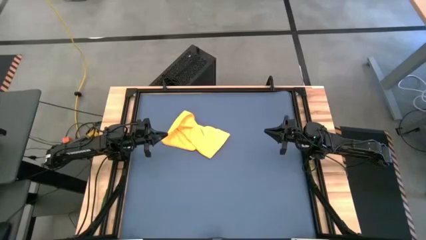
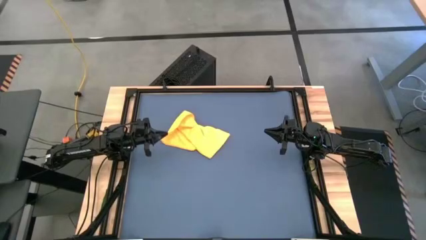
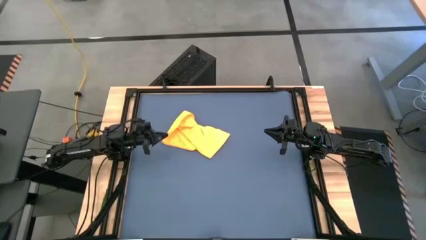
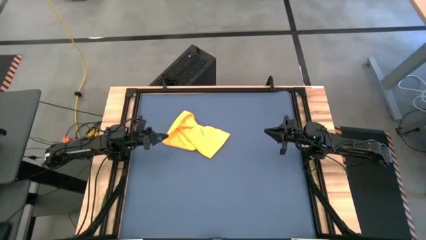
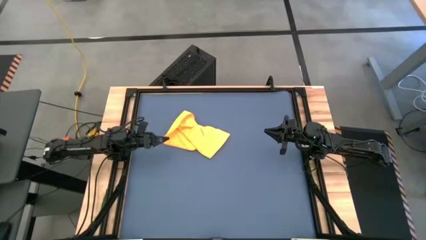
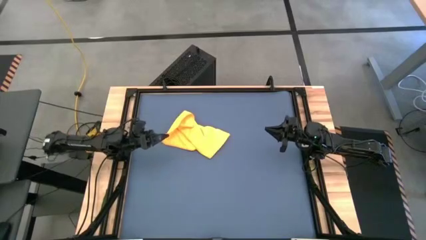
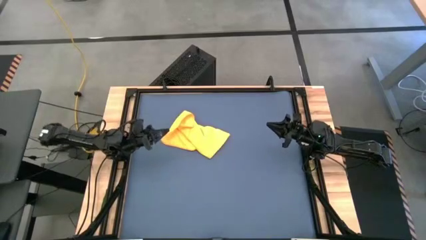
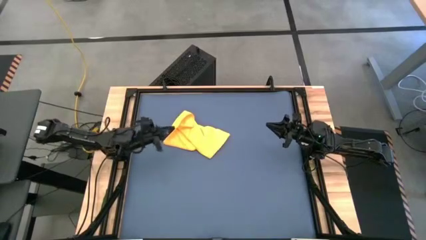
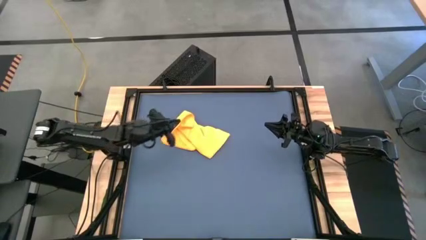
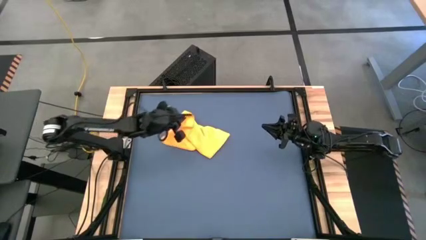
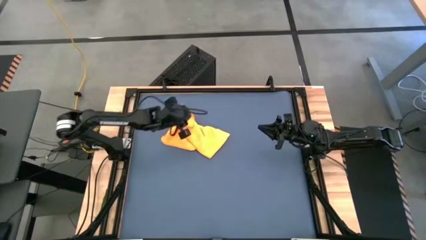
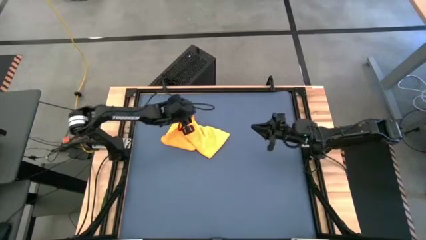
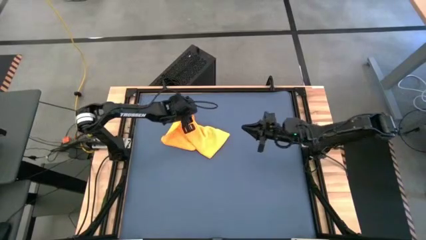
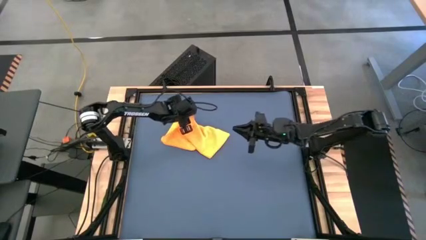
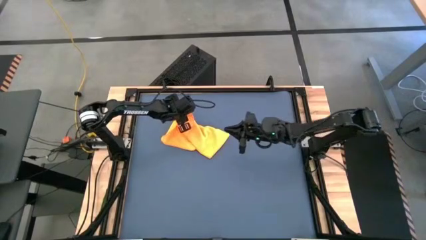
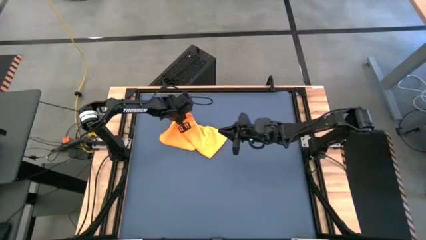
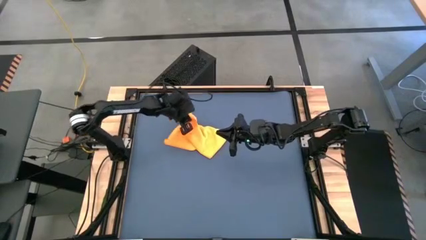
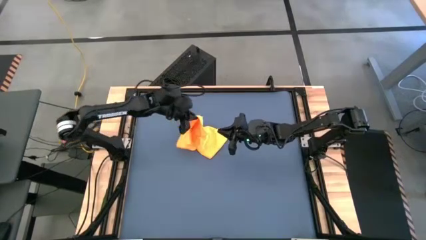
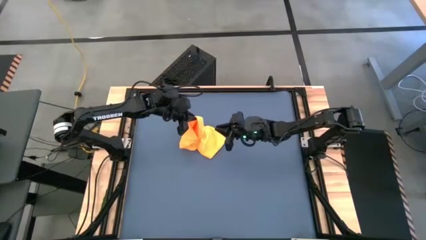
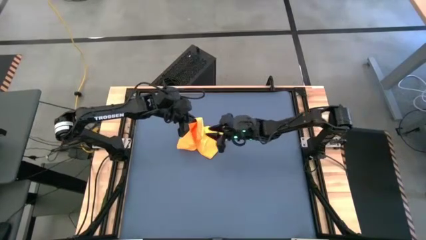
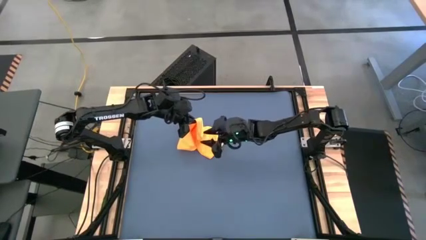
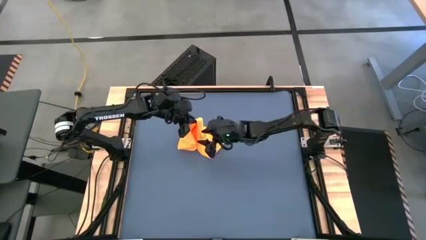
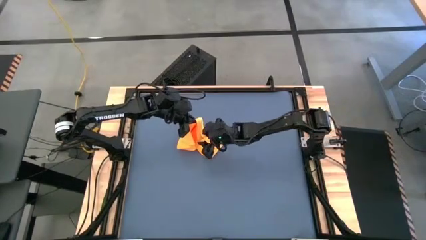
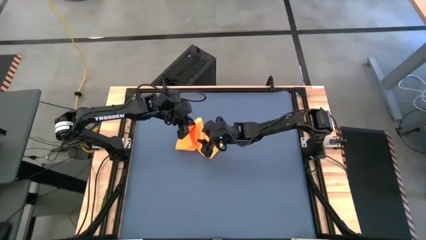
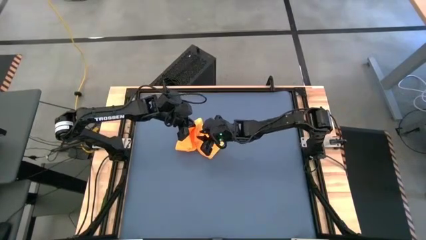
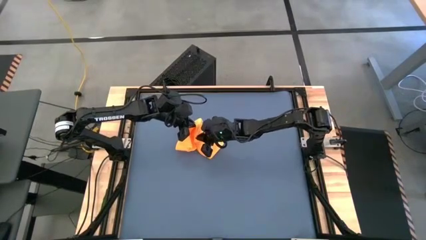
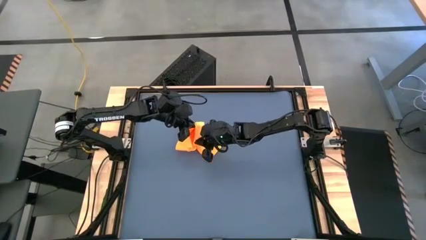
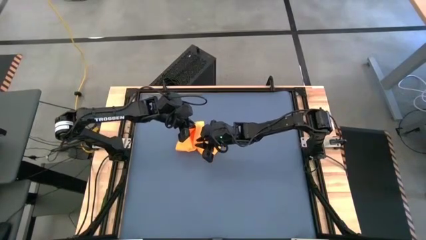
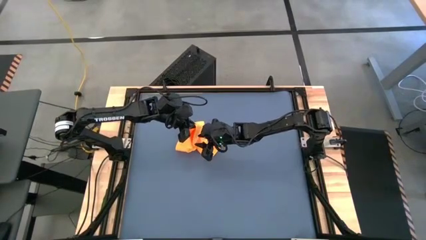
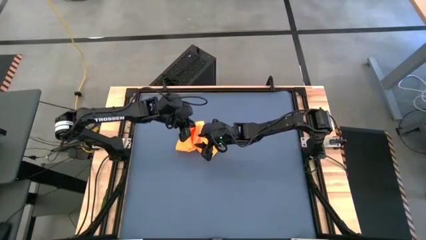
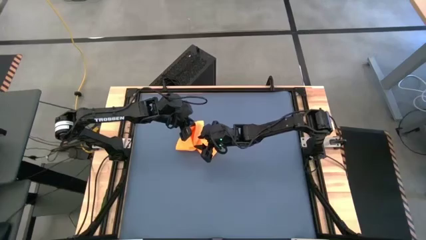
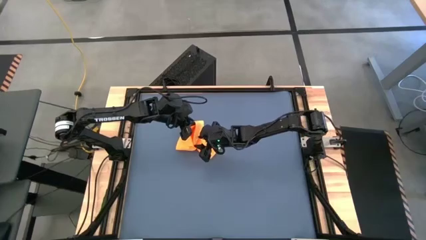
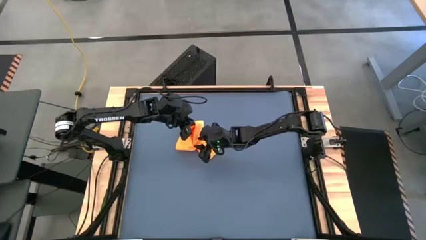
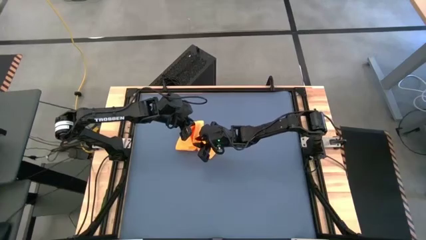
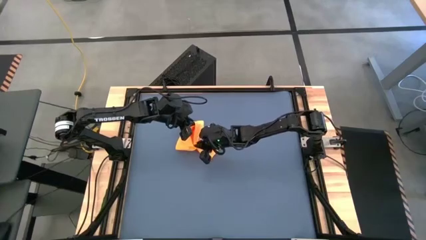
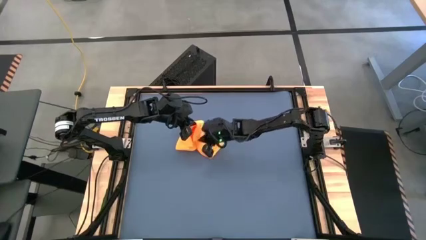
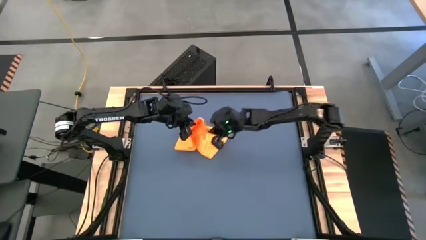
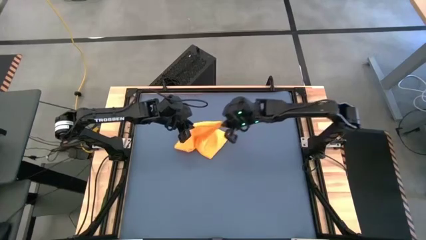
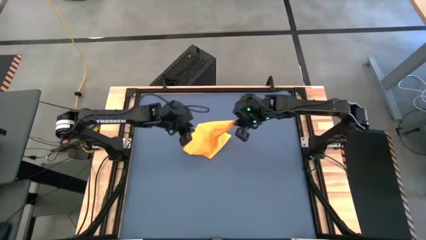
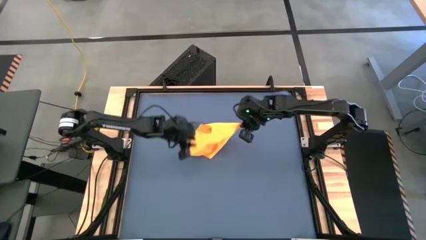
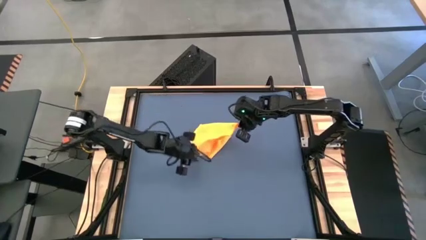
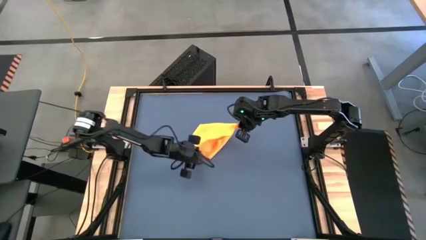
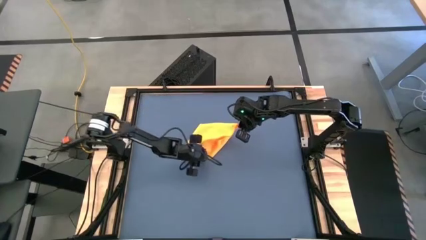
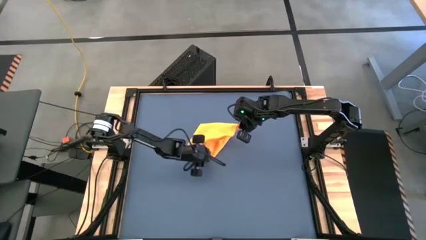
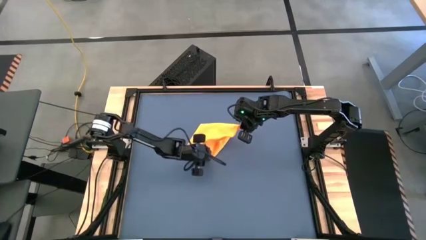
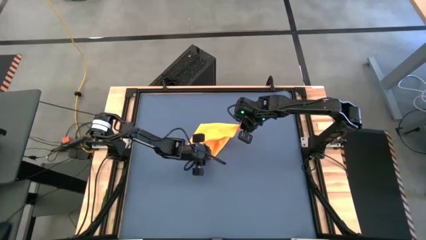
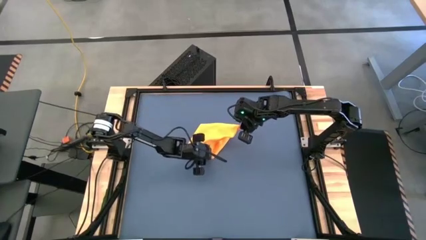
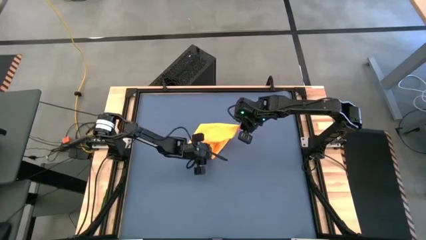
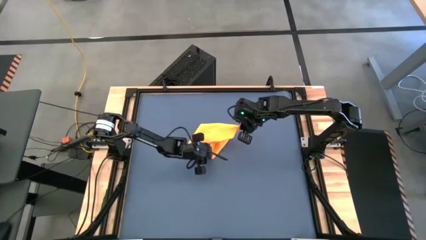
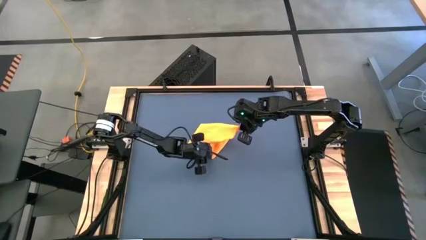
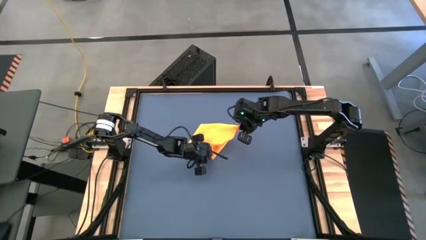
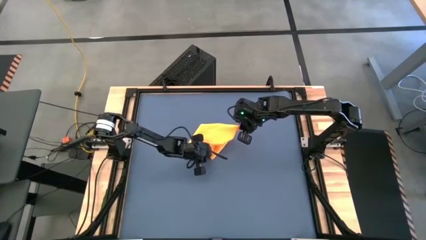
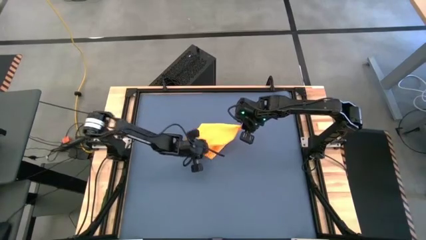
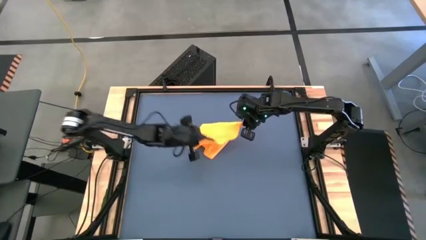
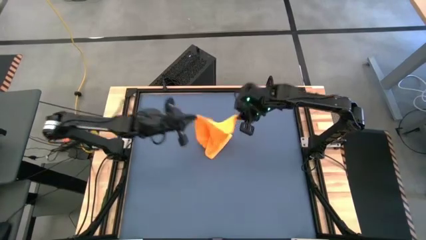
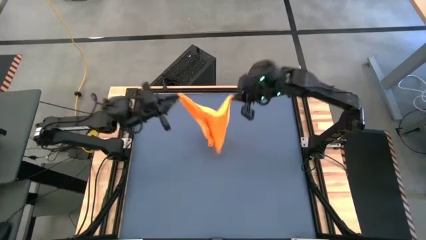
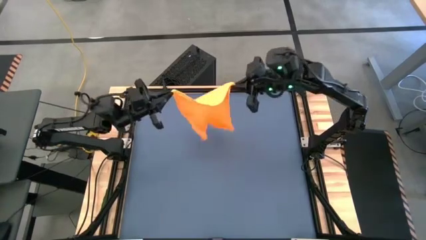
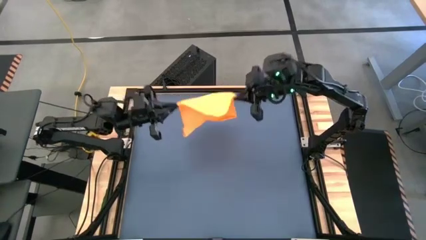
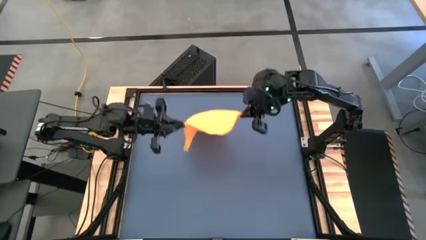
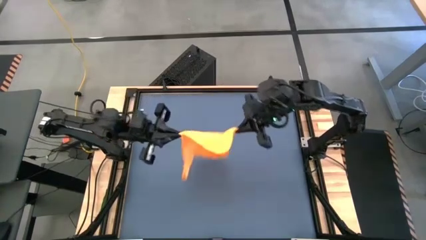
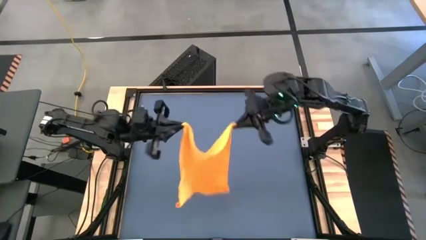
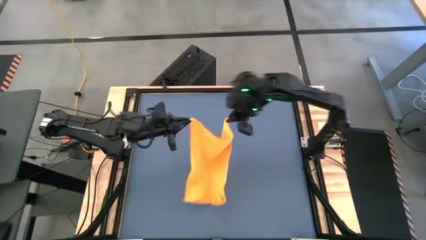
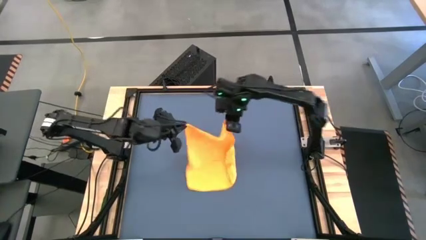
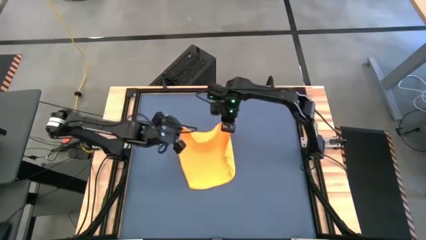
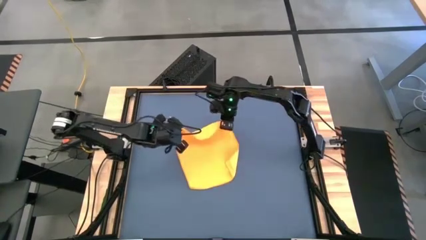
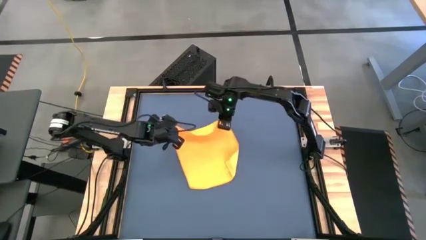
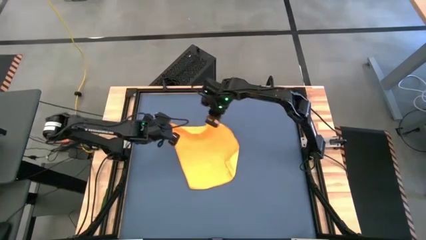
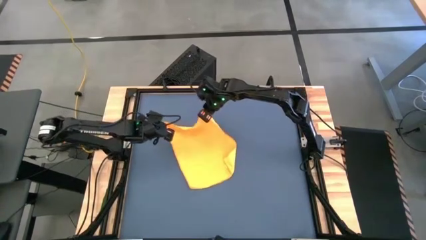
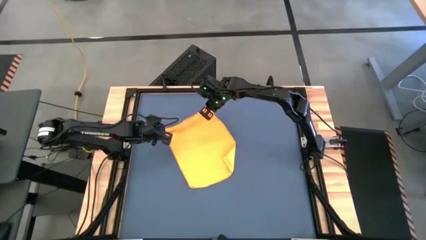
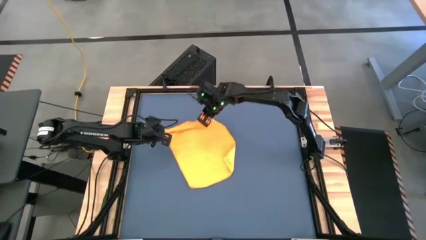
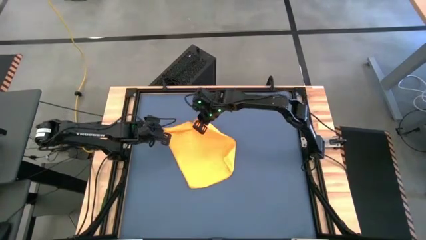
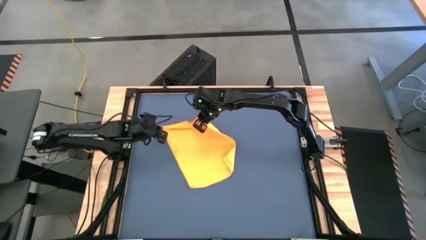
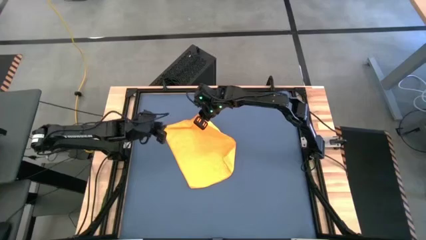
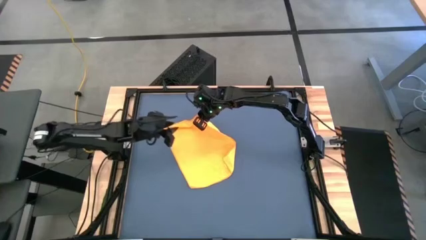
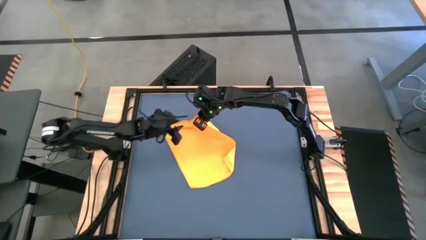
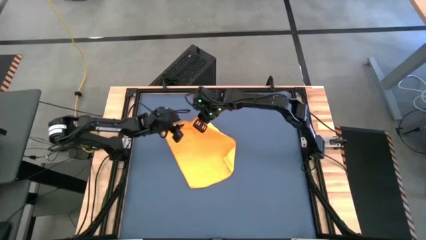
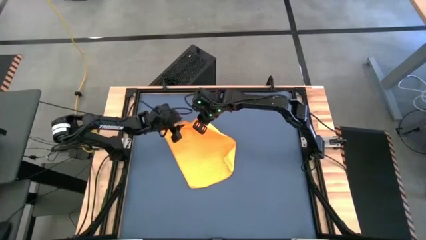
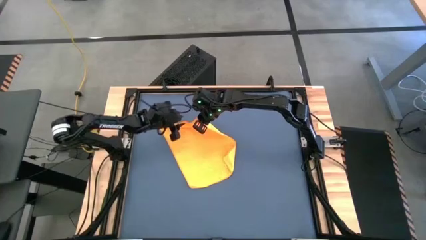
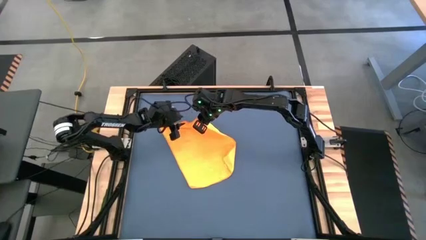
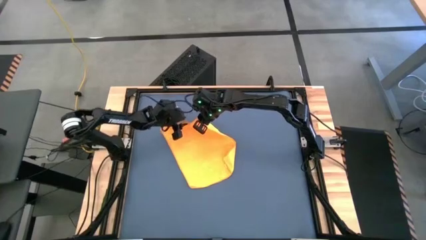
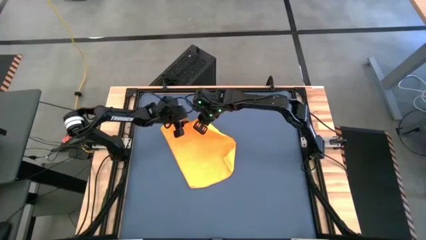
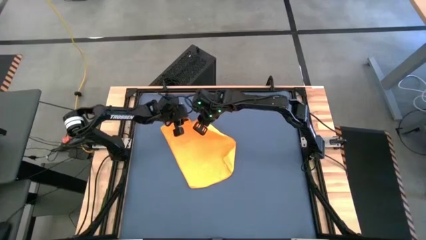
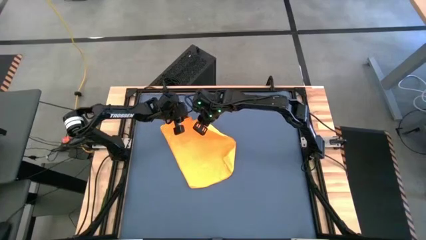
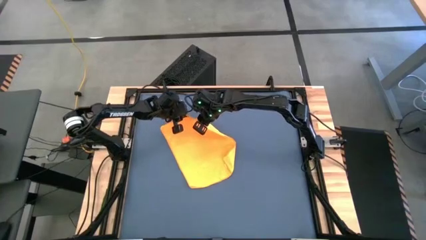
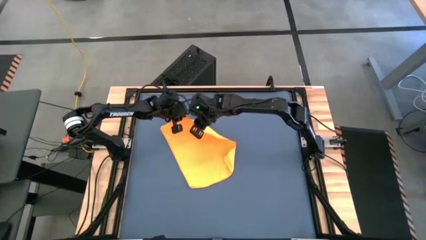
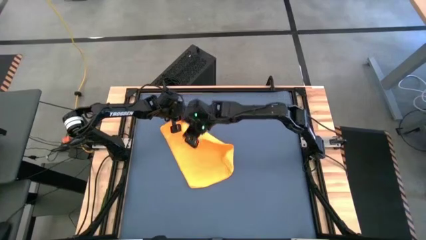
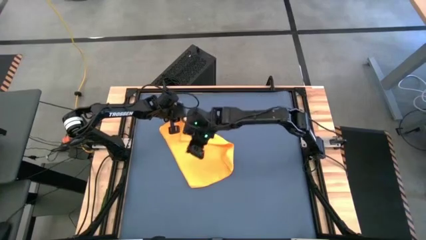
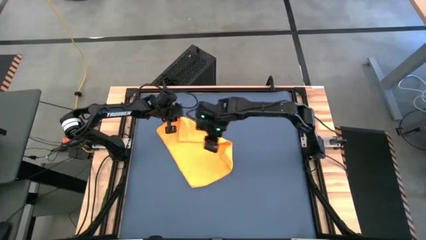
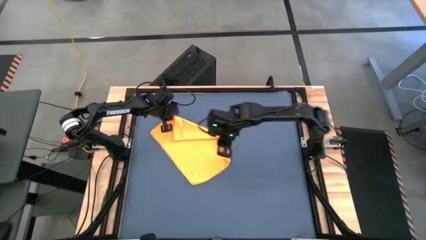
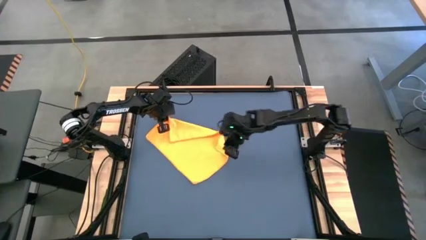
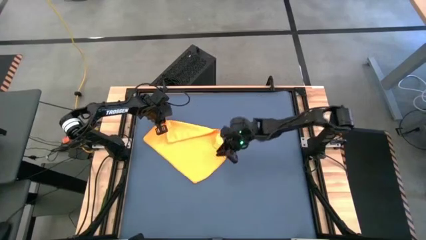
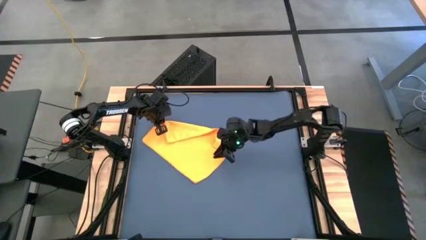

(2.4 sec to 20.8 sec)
Task: Roll towel
Fold the yellow microfiber towel
